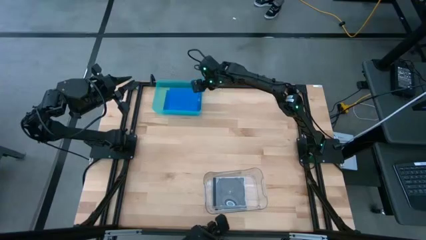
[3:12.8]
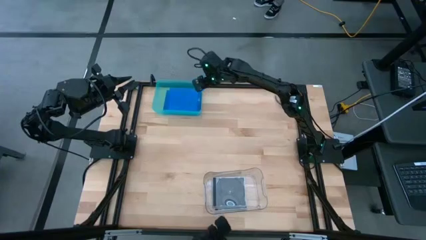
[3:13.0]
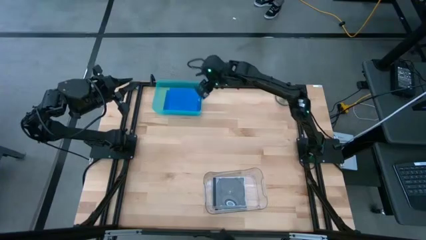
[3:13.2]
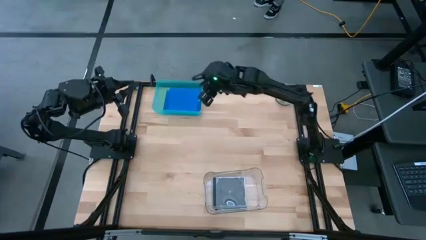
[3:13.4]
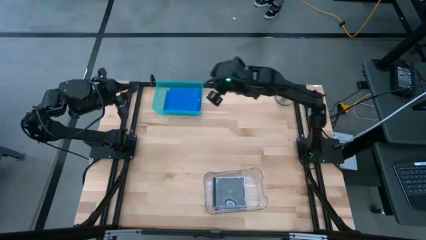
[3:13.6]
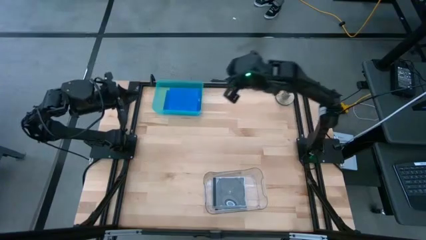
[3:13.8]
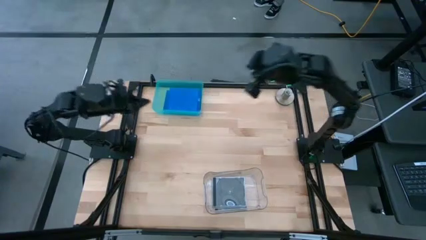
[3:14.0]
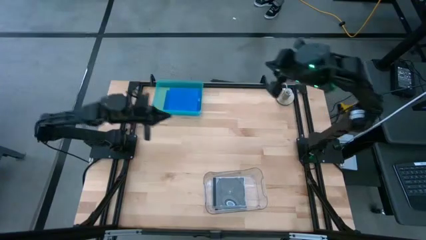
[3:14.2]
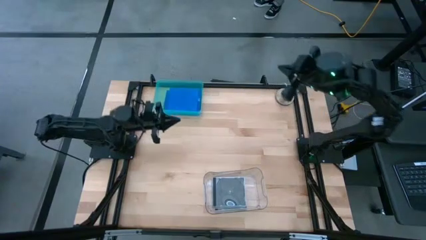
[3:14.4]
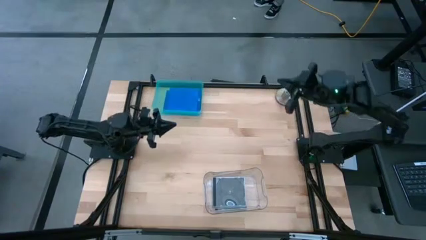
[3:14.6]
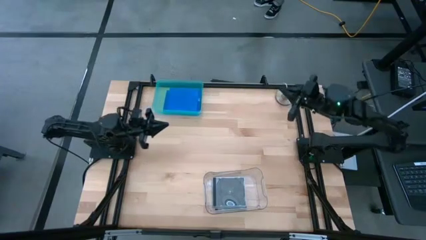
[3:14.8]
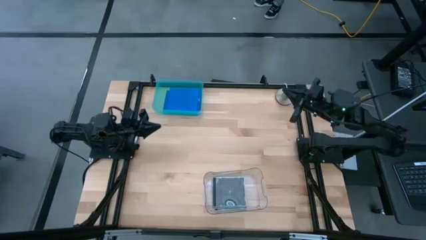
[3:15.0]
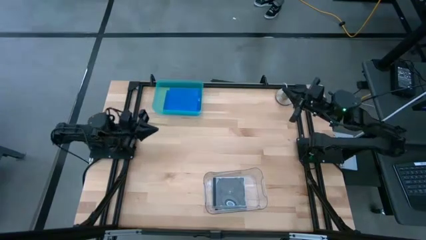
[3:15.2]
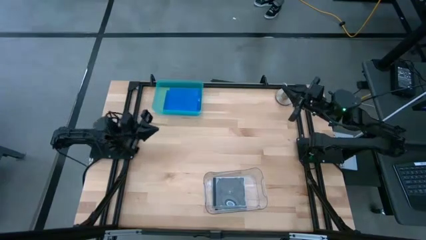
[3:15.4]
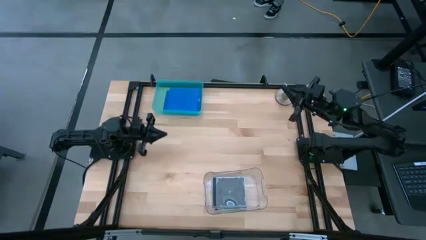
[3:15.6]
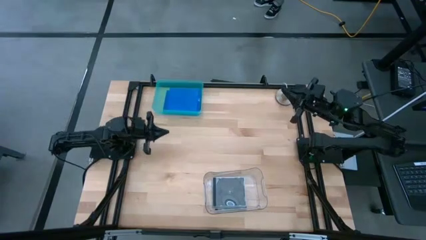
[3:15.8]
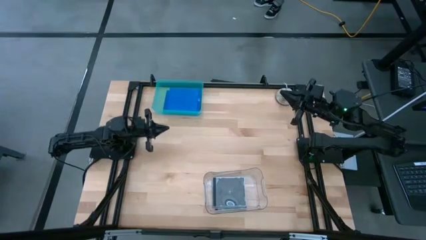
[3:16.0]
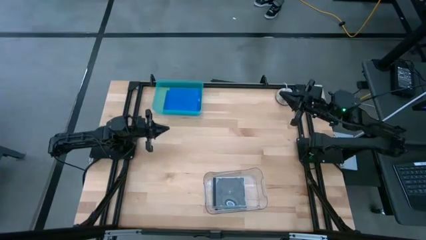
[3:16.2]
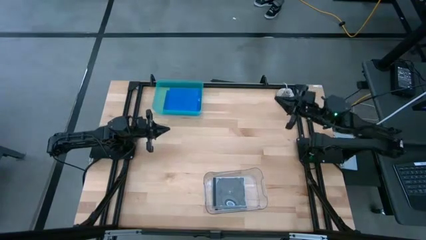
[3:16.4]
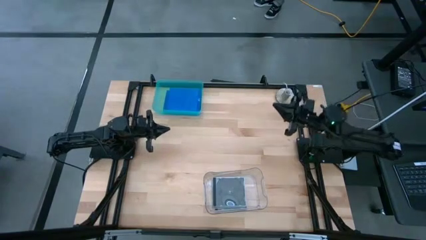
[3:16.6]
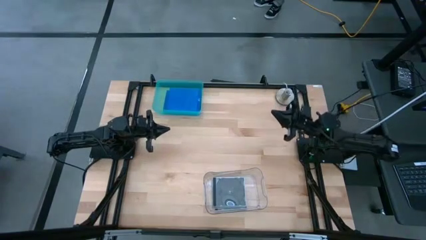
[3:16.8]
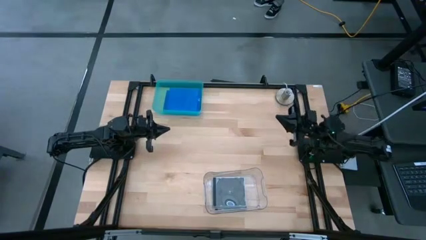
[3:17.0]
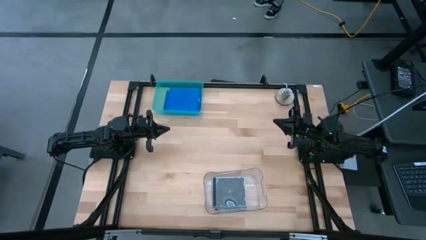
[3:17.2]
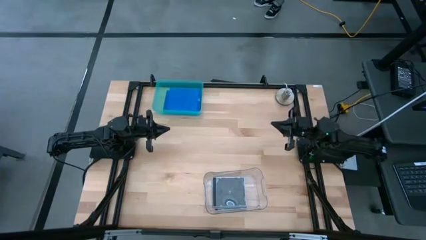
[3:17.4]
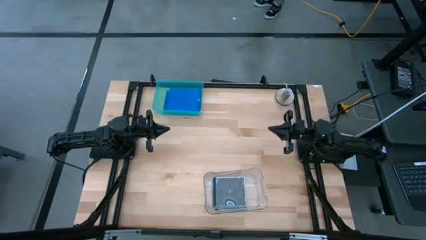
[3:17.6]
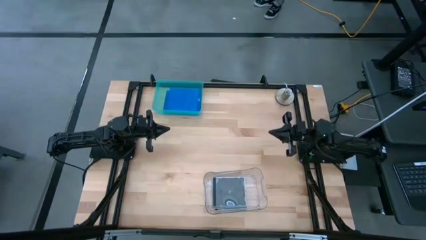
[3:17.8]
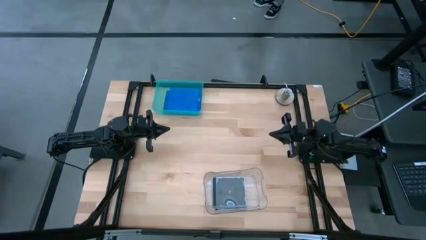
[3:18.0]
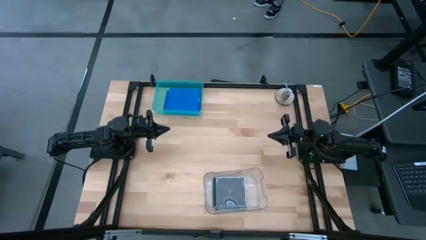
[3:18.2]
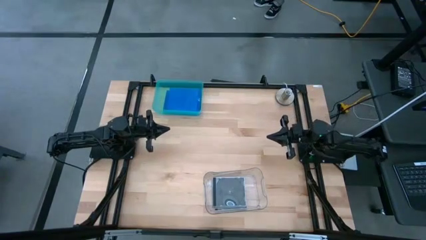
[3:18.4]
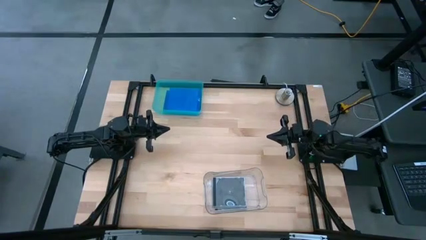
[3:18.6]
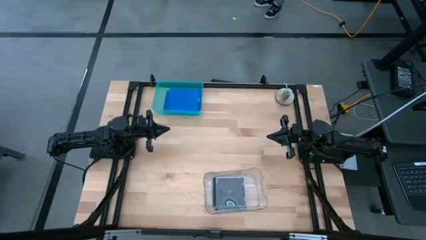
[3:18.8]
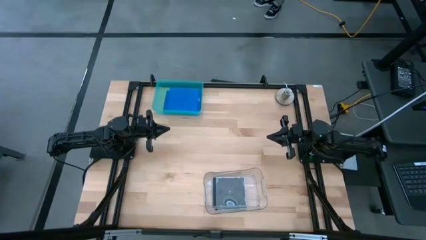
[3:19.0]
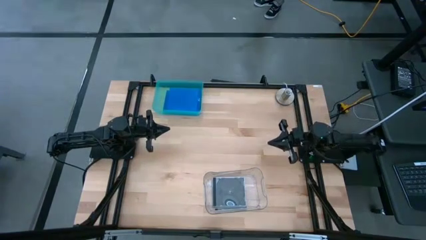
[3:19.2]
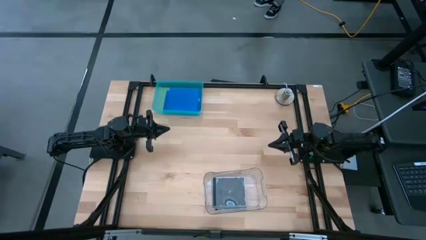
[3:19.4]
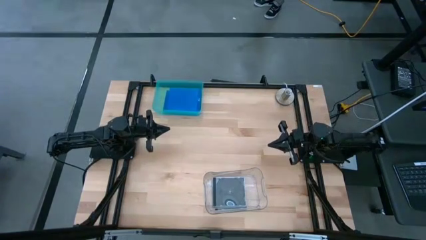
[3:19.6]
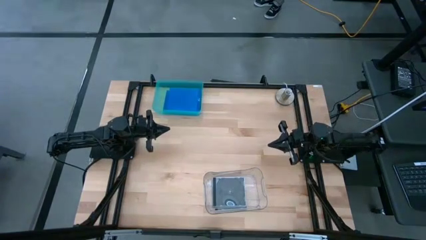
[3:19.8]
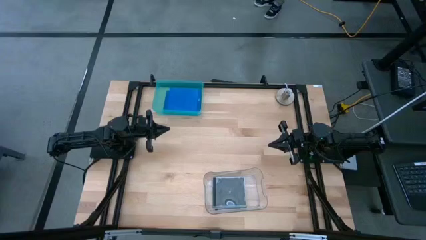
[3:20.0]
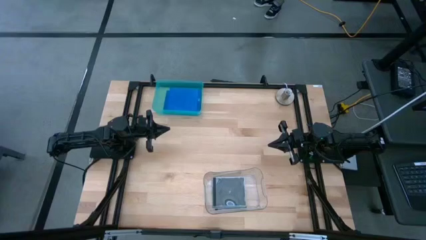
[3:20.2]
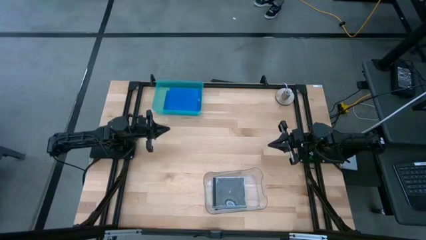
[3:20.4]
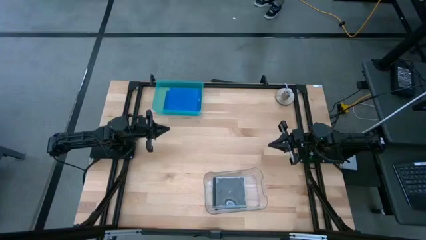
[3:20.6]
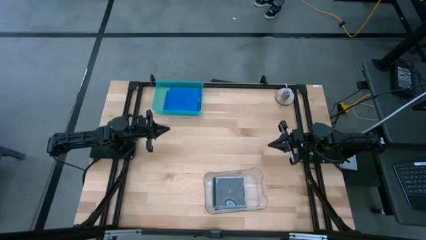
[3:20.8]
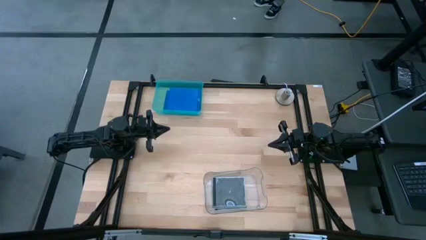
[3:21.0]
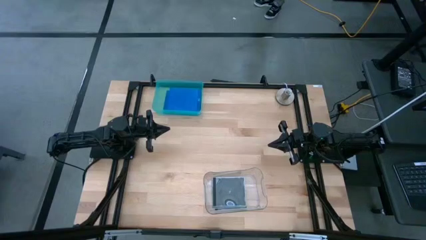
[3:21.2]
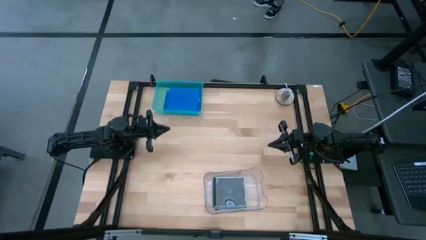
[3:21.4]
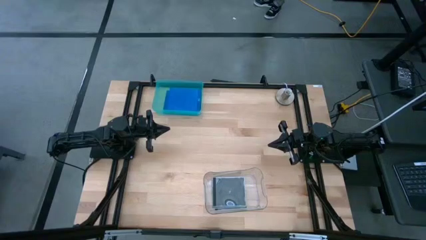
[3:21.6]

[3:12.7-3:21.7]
Task: Pick & place jewel cases by type
Return to Home Position

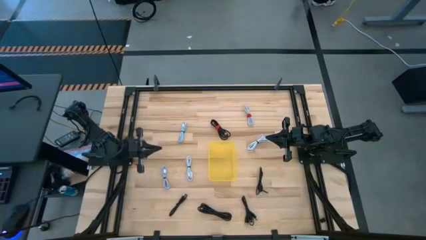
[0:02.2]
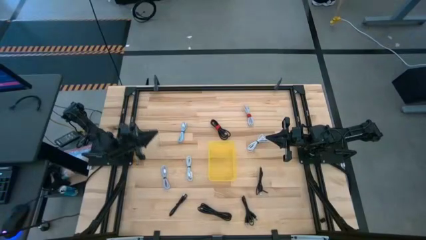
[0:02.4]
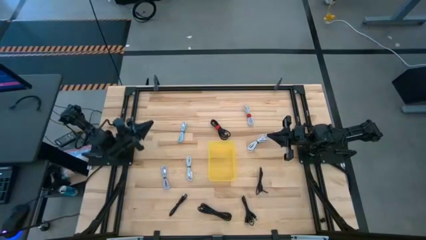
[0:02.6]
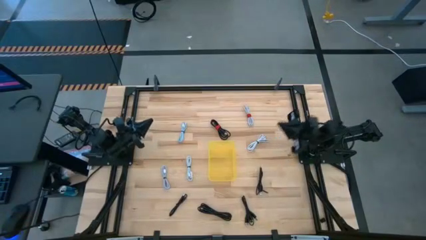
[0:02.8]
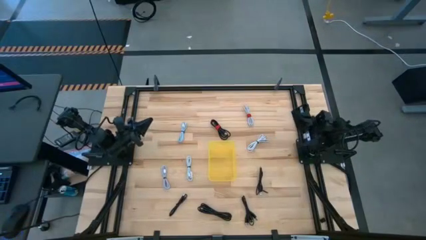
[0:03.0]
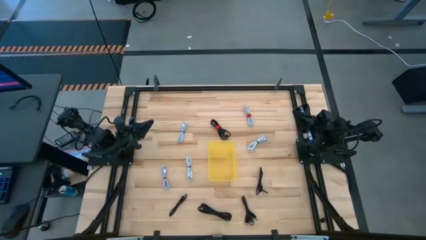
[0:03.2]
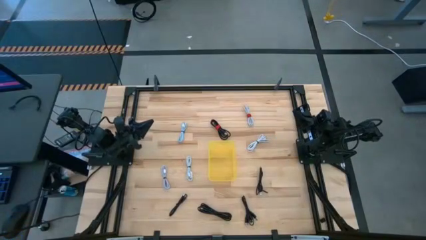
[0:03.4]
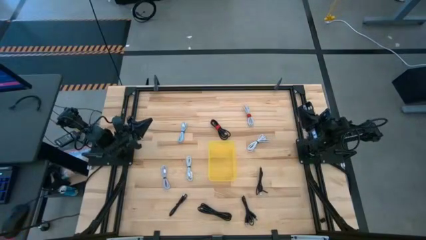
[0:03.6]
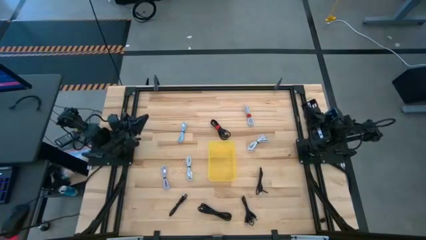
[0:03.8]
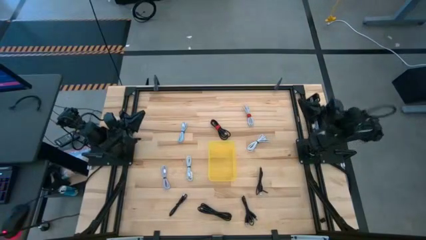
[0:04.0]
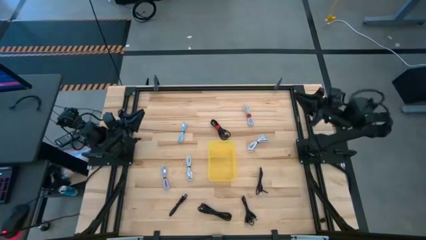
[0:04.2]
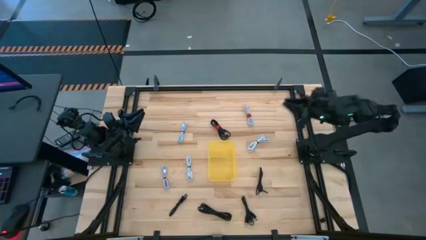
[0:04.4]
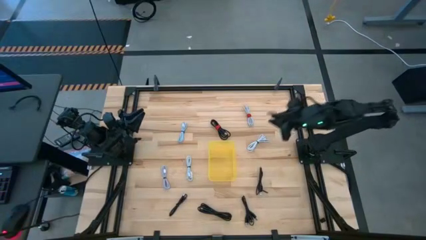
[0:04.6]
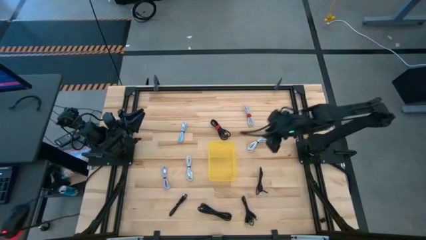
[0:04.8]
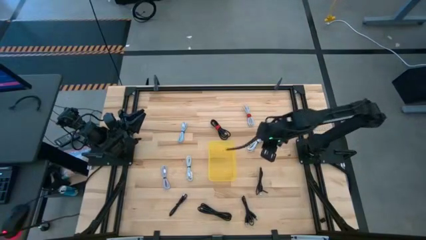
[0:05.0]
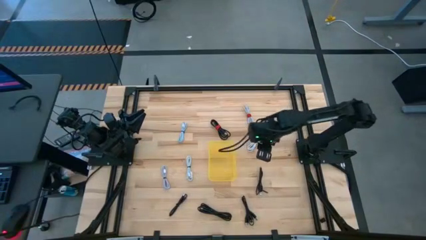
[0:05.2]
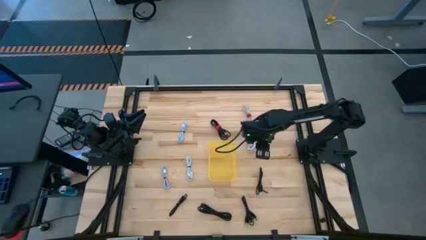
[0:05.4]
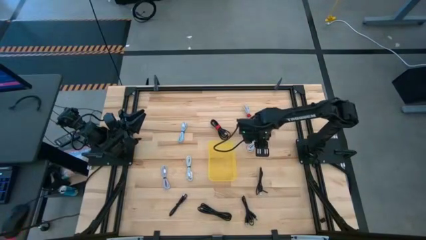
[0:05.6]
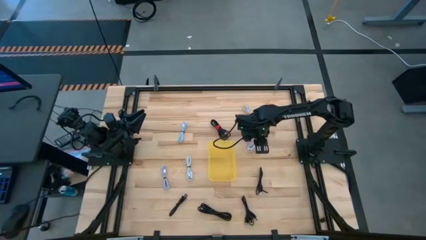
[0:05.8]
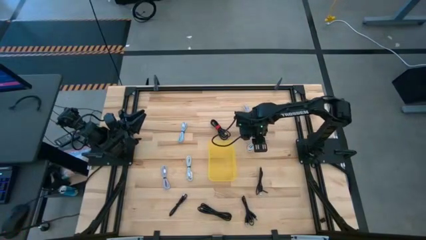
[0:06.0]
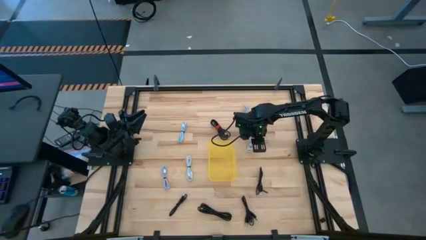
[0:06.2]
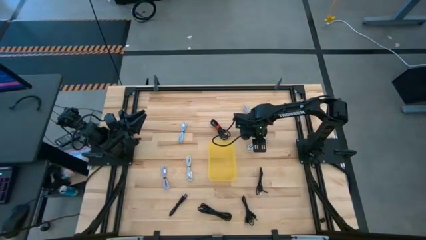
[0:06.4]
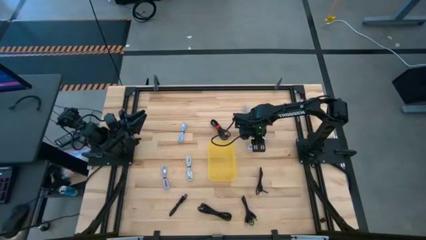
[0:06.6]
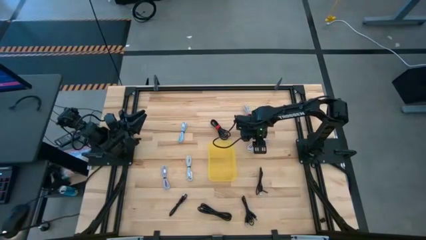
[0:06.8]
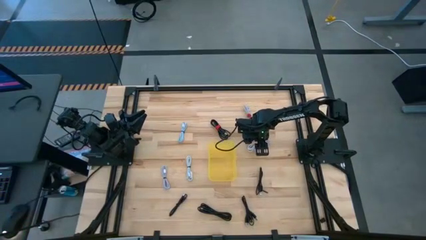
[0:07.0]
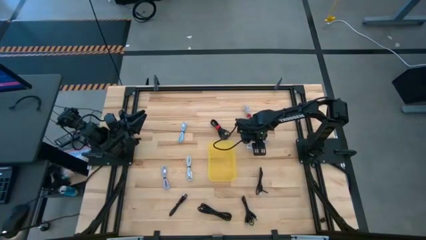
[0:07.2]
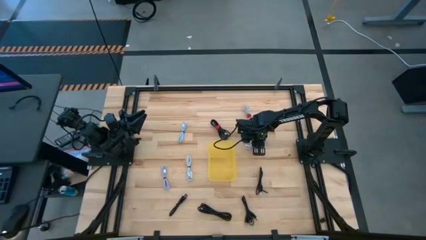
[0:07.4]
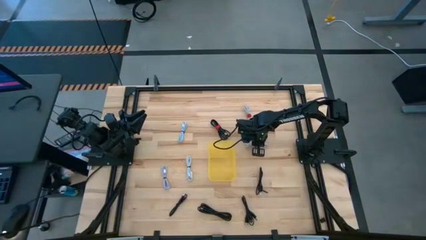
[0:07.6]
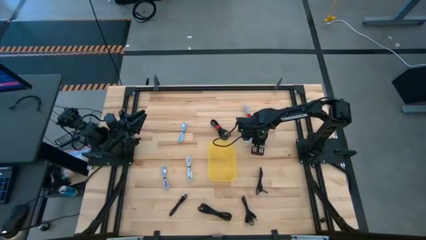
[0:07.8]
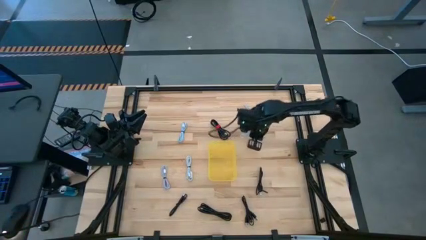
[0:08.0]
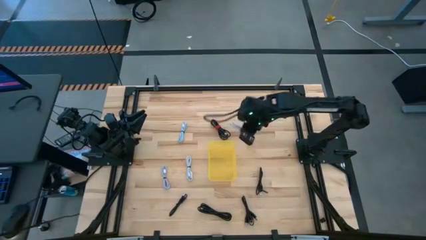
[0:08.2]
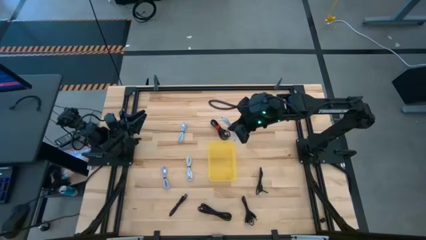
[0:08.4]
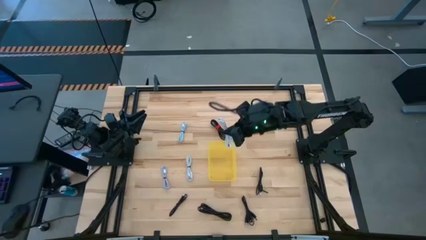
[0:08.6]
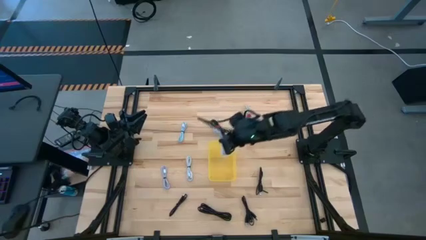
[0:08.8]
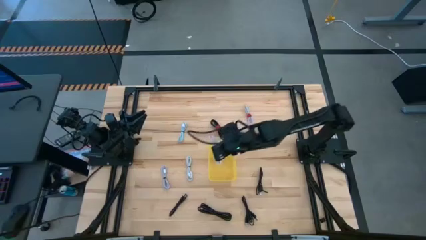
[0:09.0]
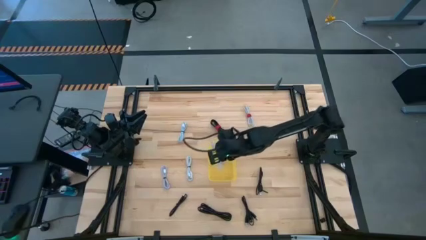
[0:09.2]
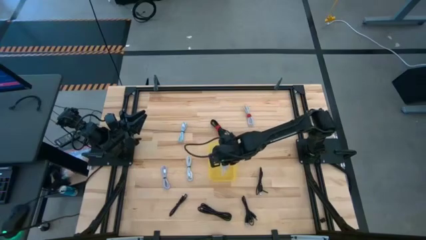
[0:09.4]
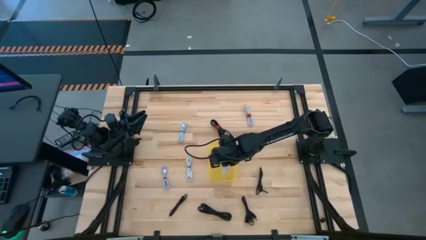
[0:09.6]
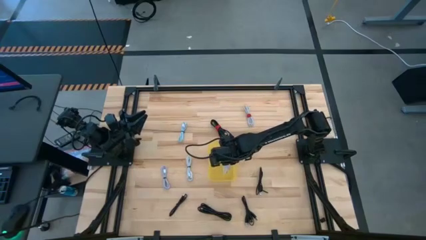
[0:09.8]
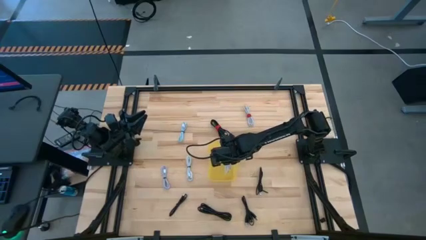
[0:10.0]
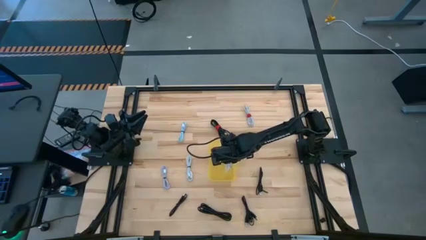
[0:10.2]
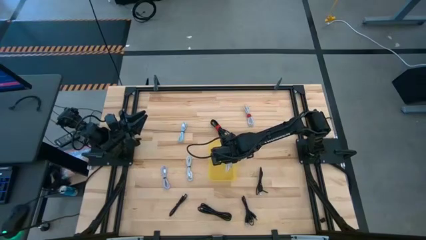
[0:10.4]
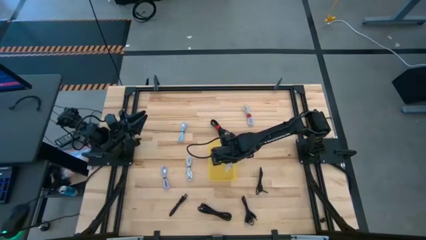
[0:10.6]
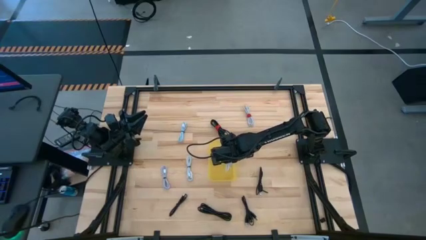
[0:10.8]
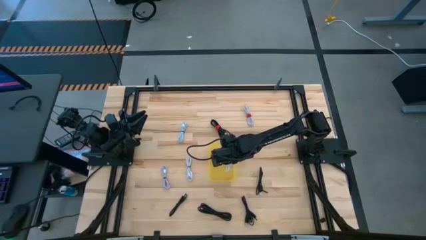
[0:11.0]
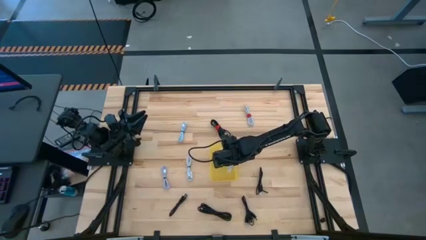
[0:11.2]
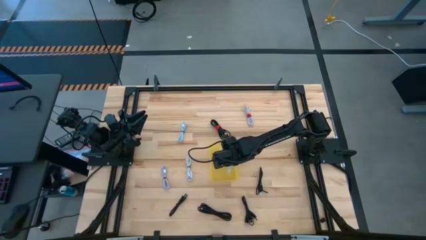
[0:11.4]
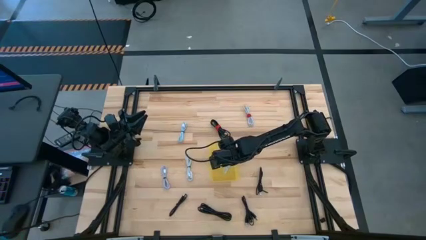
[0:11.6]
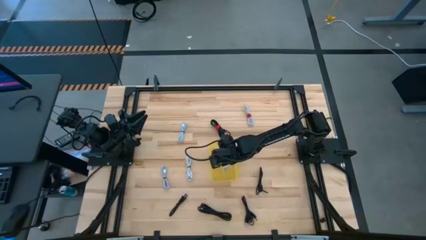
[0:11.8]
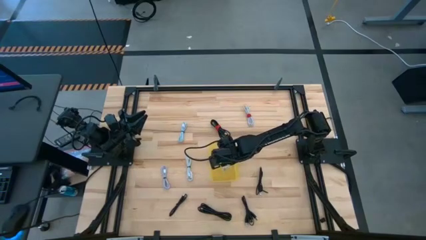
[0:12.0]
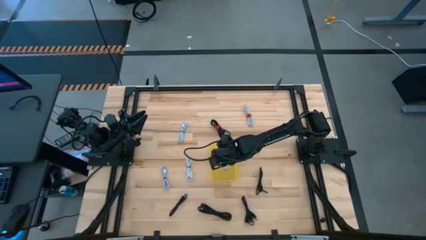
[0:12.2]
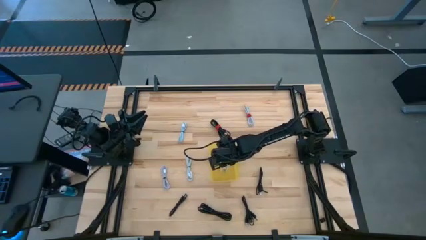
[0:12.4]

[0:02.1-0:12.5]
Task: Pick and place USB-C Cables
Put the white charger cable into the yellow bin
